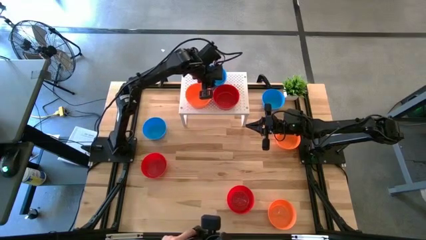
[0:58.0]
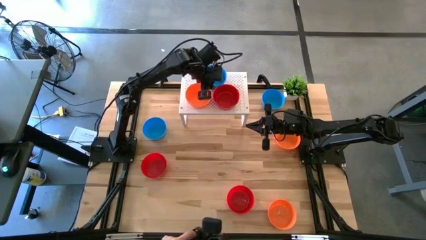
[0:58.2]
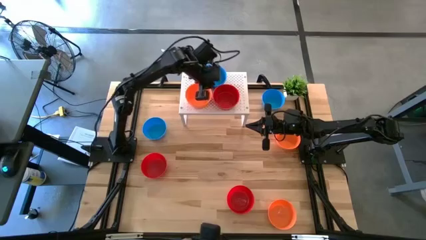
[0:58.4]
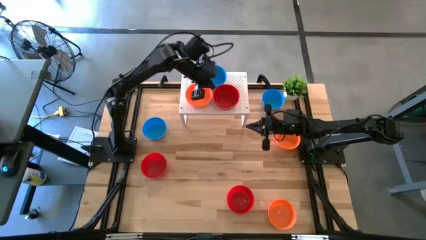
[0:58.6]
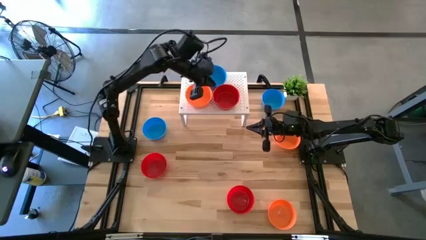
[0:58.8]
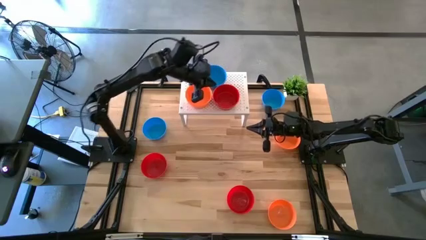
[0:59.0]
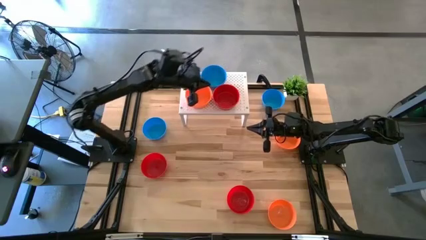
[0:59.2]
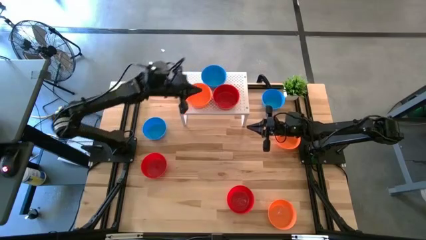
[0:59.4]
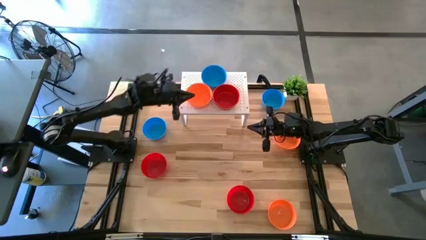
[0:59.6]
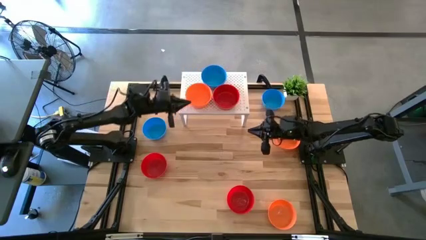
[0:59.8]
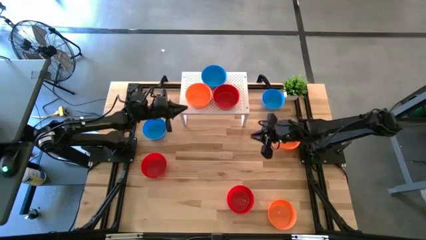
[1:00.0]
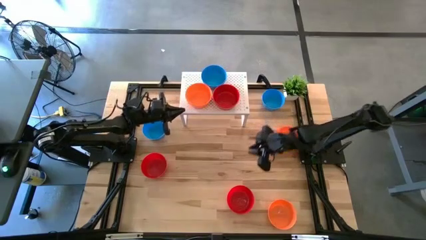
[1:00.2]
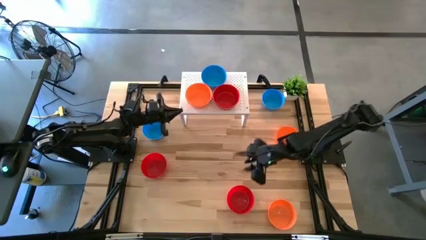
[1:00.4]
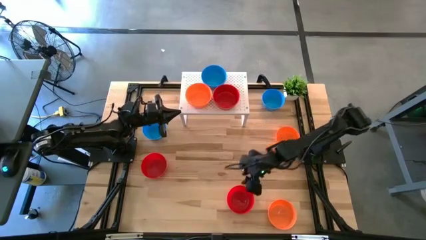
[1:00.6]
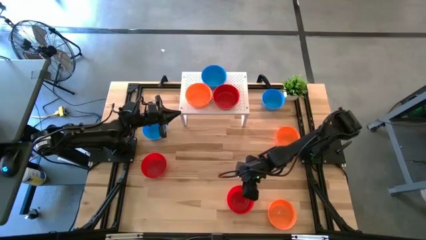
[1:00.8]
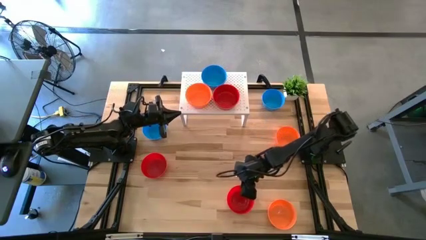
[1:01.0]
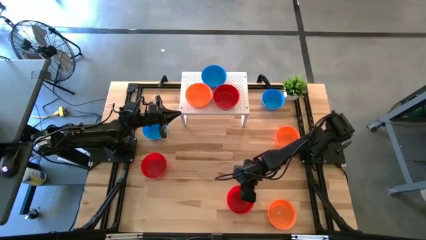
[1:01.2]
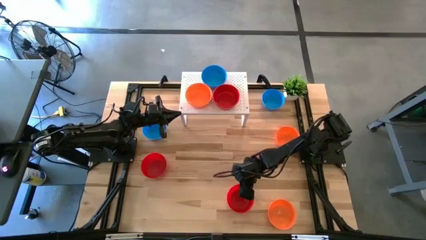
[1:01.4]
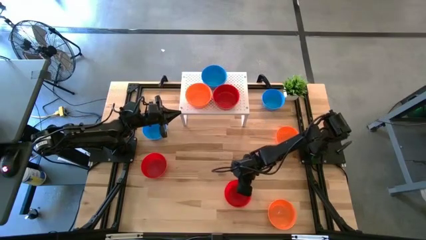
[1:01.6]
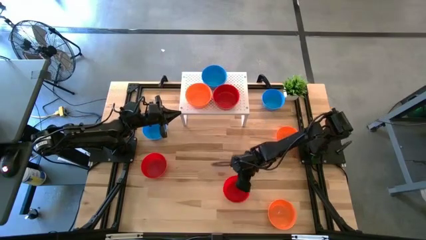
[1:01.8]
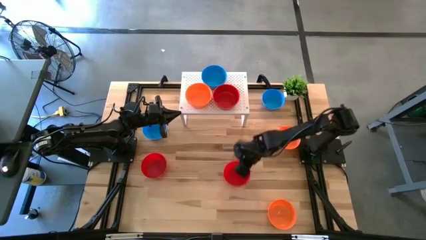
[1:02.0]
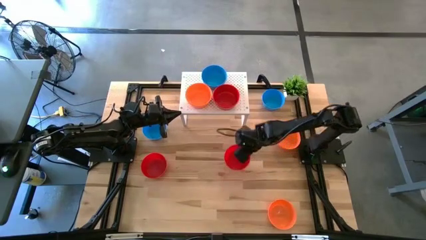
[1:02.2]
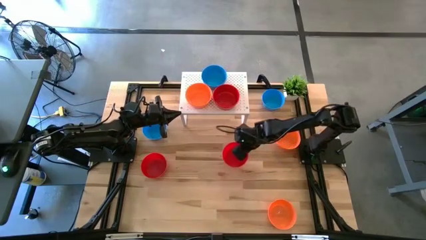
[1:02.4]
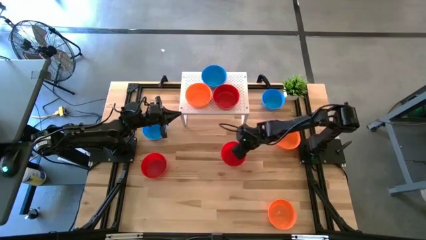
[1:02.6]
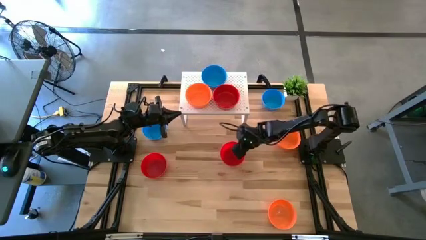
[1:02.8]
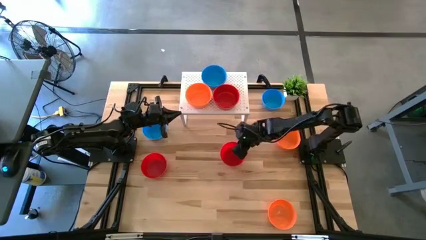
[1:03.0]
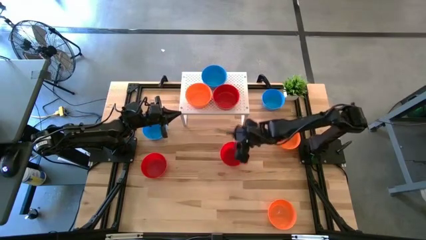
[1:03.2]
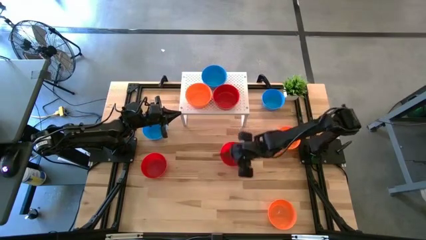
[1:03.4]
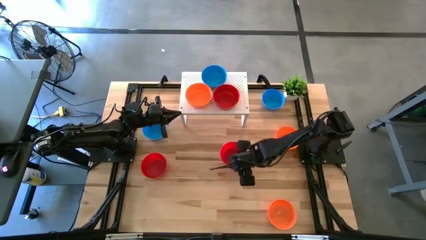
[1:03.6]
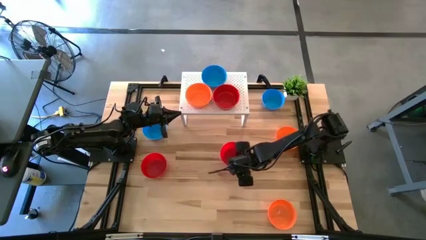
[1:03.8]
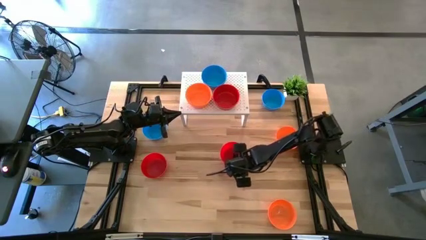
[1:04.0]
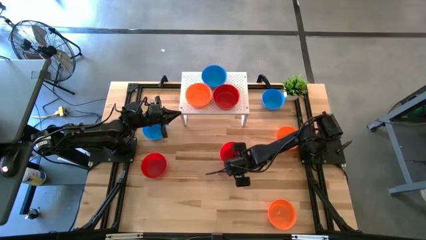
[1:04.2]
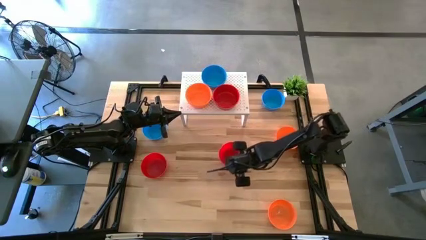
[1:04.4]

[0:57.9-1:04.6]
Task: Pick & Place Mini bowls
Stack the red bowl on the red bowl on the shelf

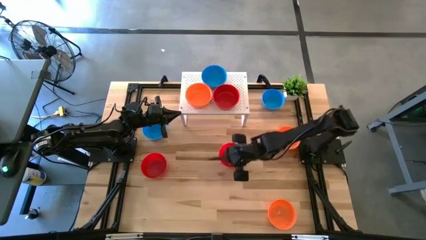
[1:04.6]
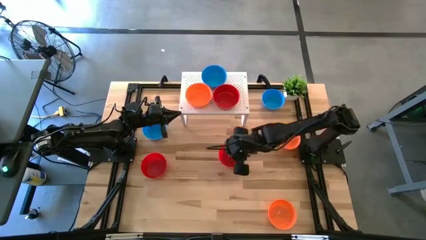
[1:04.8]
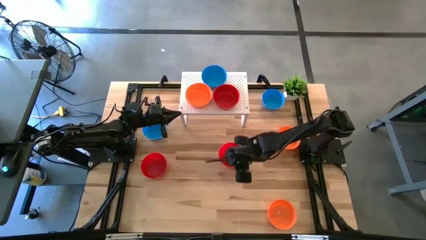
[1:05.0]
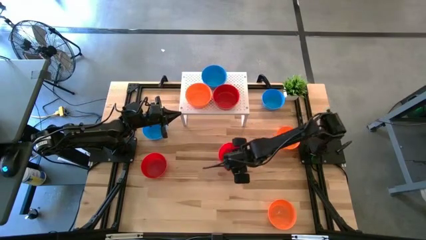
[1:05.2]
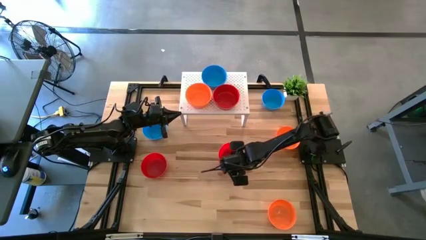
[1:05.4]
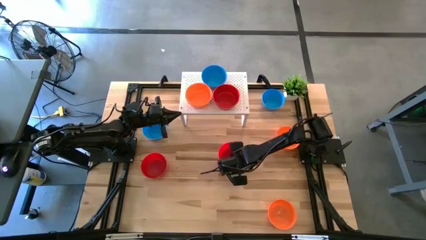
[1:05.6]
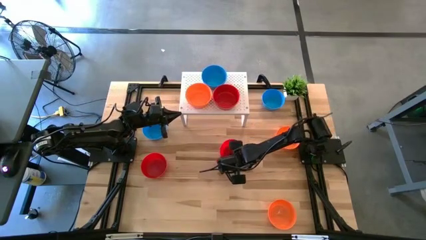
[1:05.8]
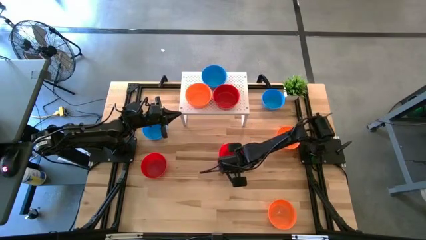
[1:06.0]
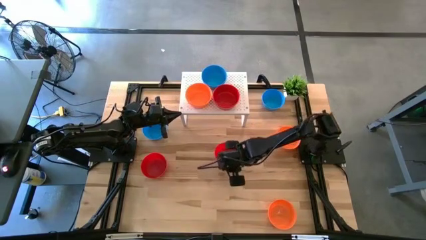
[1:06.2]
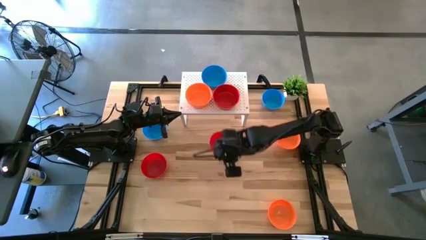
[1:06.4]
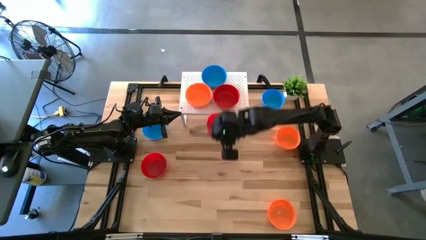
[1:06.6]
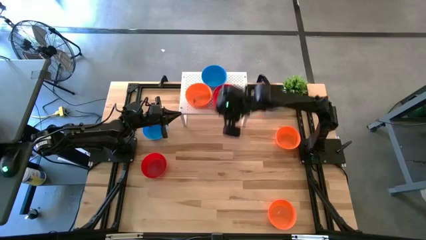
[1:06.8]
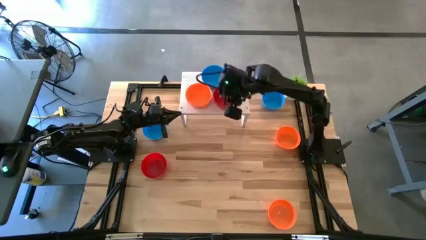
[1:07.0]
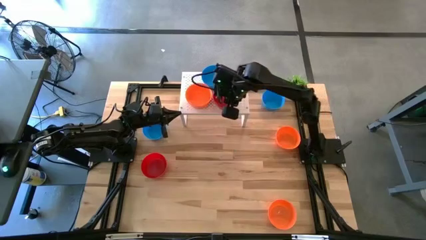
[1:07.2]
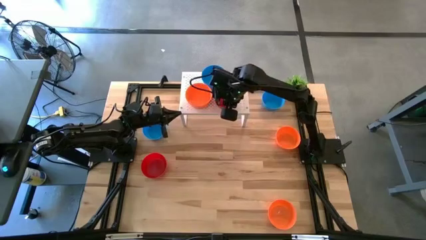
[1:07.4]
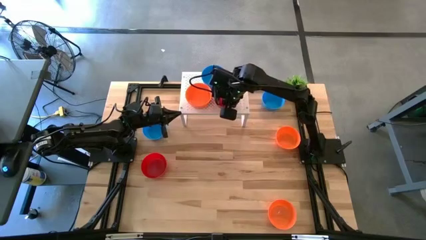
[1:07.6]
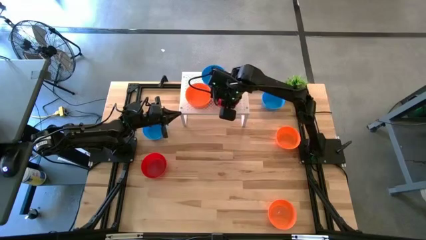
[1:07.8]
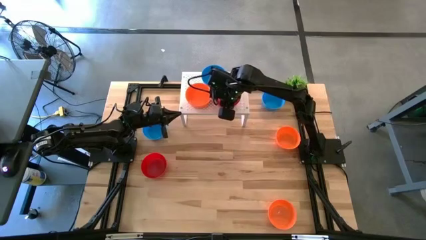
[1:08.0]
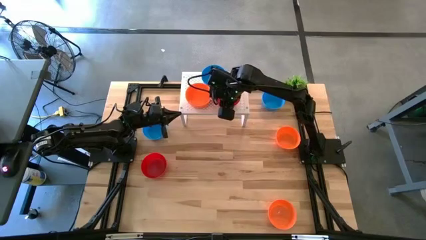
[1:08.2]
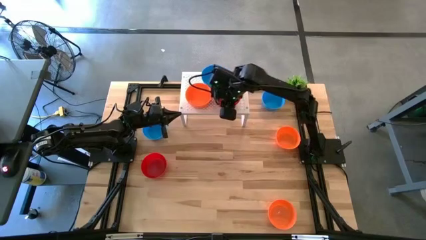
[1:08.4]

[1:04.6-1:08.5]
Stack the red bowl on the red bowl on the shelf

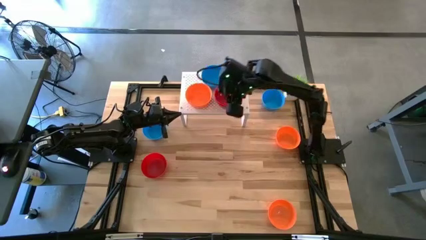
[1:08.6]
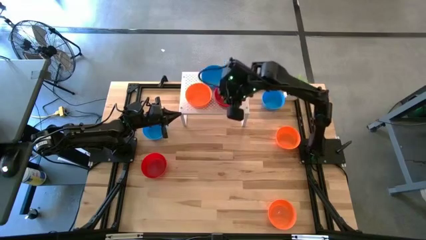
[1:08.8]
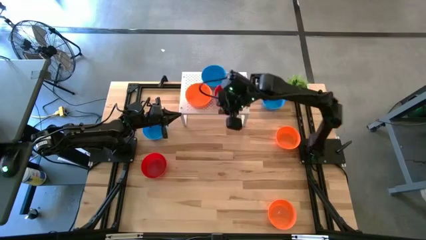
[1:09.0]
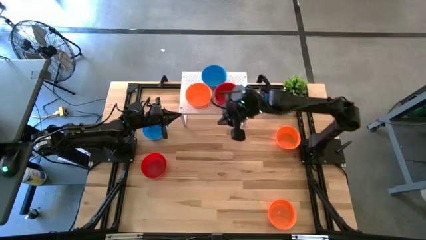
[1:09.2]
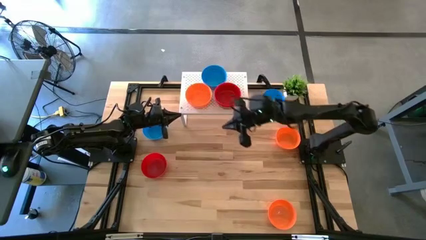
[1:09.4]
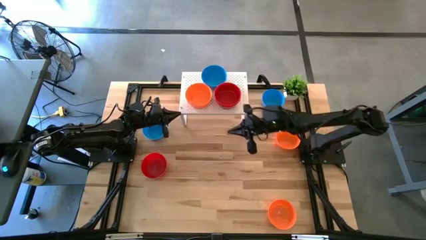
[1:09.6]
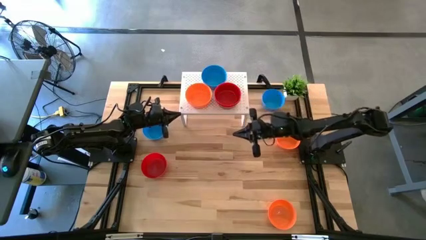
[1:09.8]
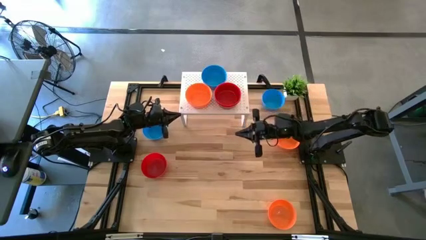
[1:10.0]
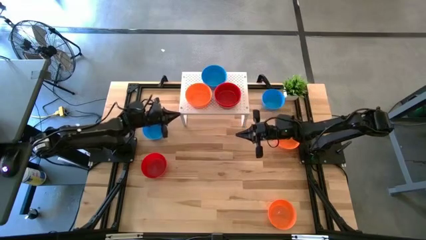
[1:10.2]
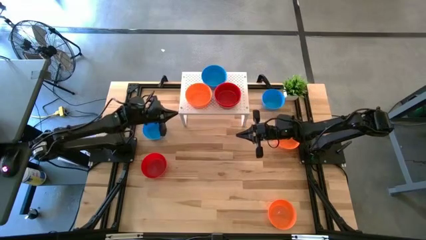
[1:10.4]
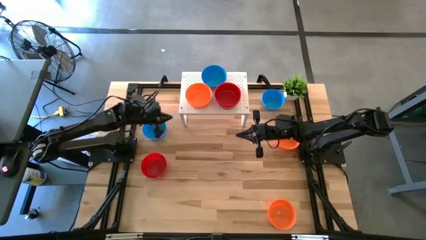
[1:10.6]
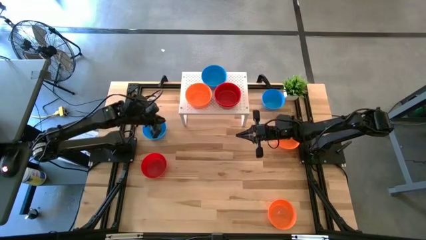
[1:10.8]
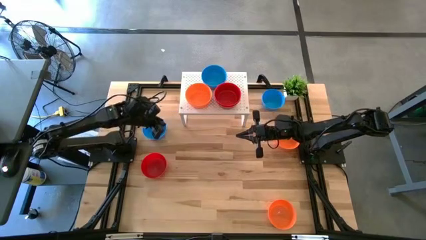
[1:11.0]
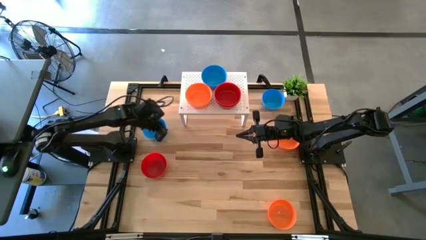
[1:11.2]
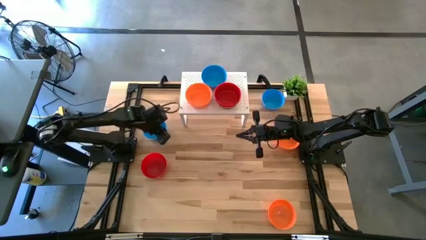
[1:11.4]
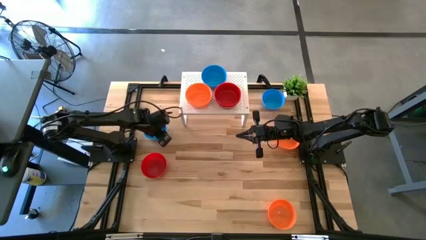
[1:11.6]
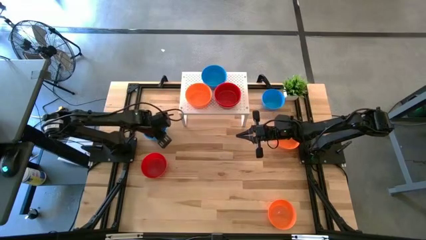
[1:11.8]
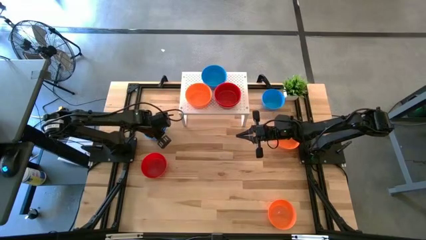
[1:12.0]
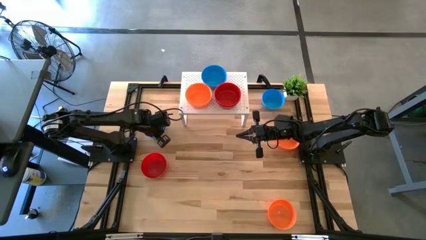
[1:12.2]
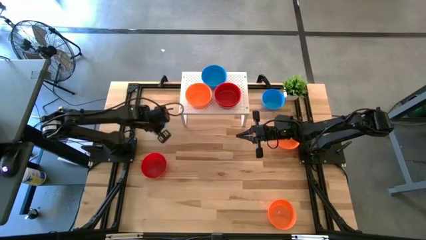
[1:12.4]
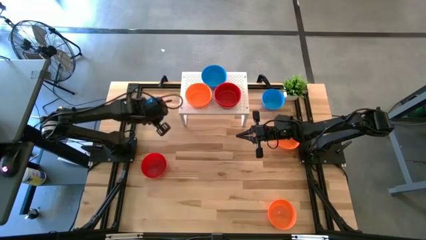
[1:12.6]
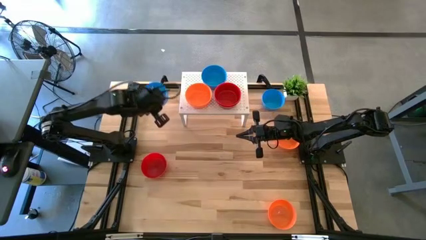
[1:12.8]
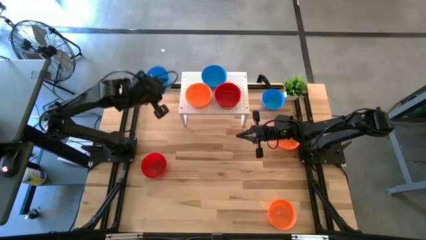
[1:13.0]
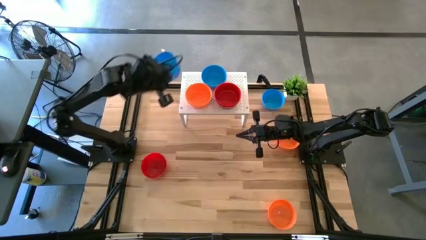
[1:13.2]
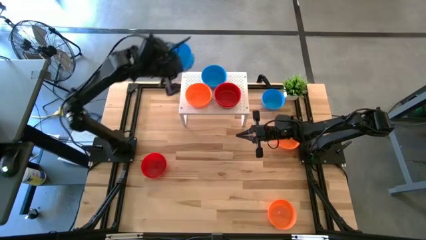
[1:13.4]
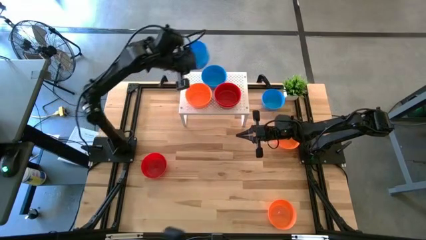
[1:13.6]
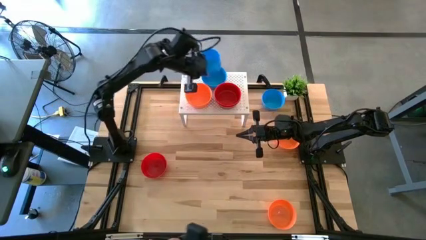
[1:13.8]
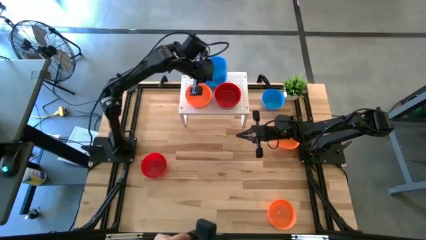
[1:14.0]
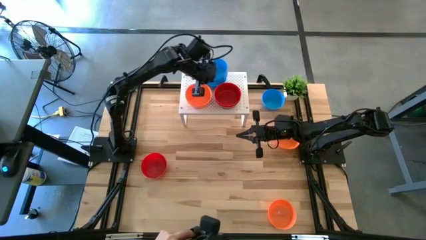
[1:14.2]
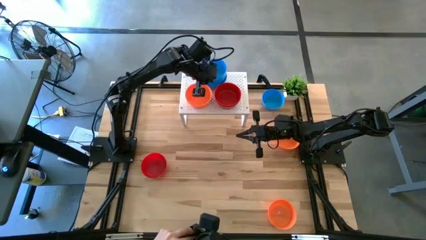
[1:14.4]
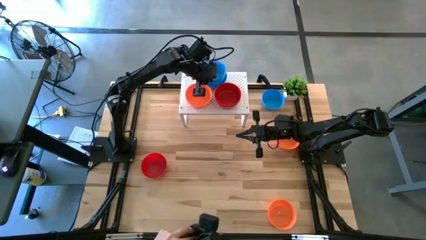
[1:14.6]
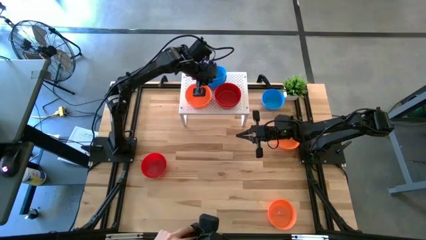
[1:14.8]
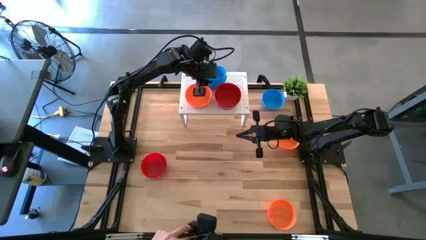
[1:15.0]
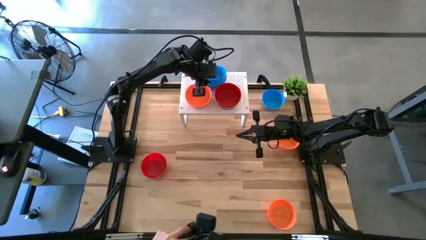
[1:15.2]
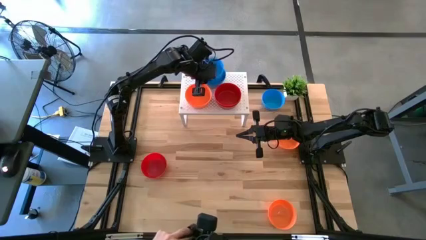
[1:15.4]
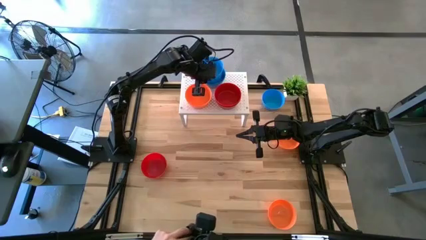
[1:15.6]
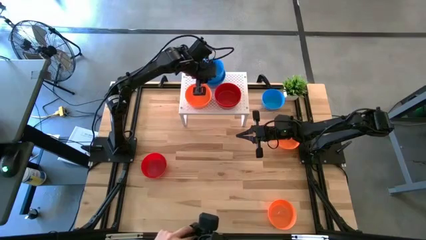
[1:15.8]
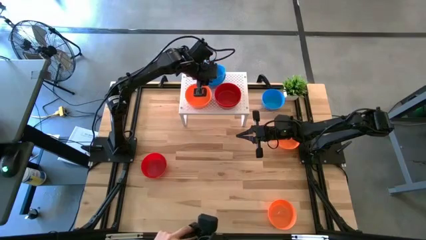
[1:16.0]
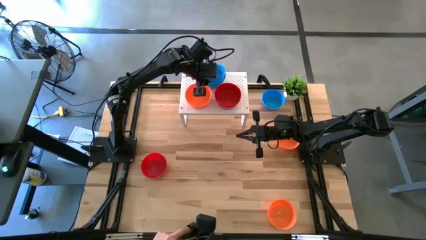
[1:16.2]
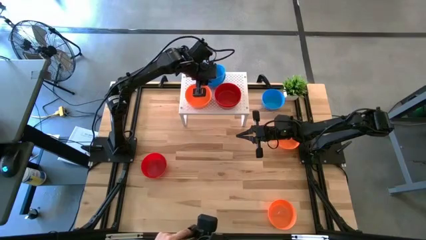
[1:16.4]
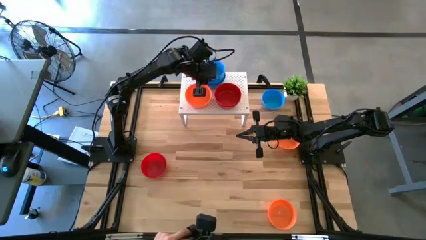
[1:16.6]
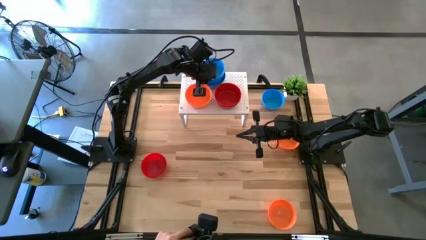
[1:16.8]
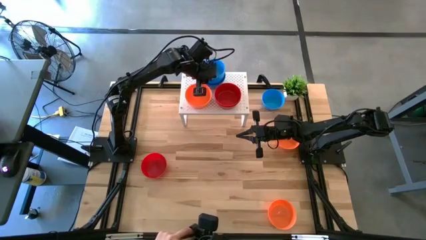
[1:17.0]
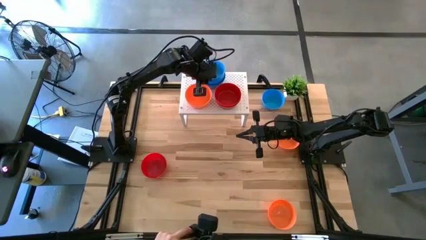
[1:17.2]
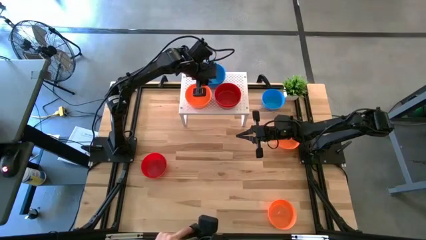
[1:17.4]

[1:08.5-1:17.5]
Stack the blue bowl on the blue bowl on the shelf
